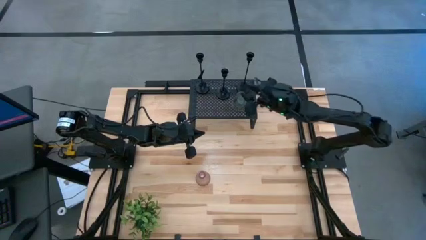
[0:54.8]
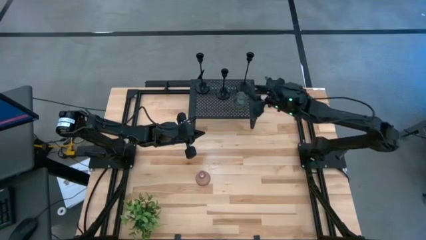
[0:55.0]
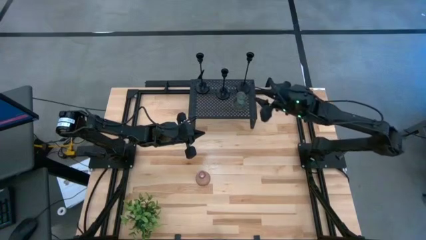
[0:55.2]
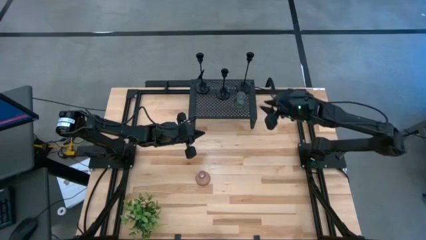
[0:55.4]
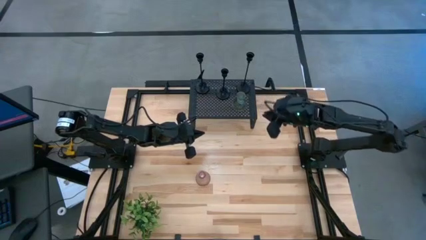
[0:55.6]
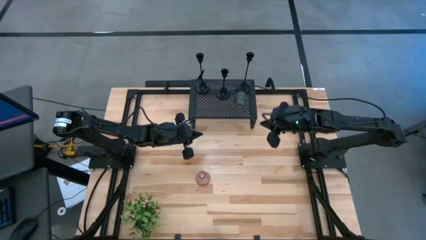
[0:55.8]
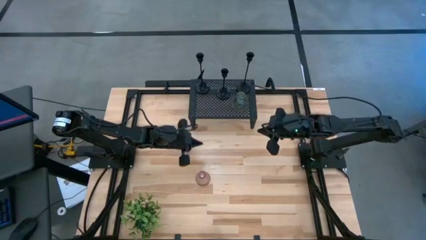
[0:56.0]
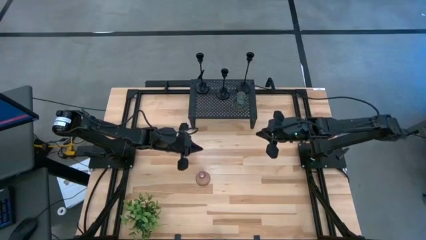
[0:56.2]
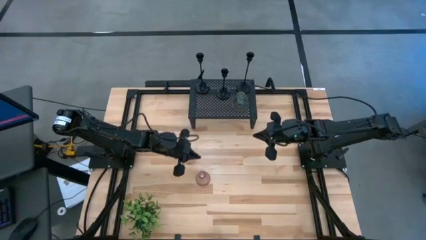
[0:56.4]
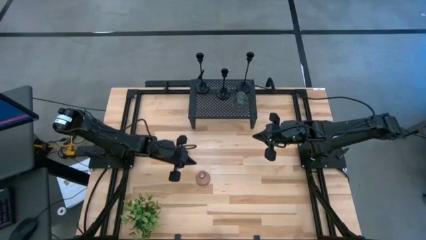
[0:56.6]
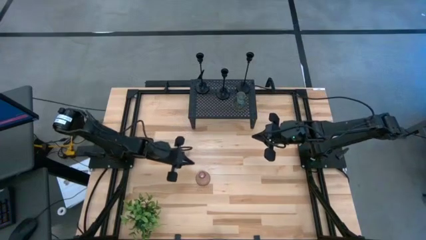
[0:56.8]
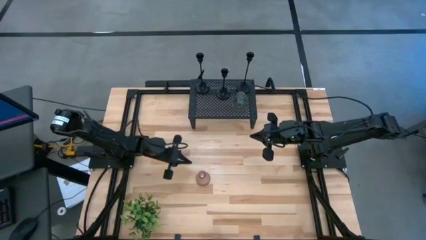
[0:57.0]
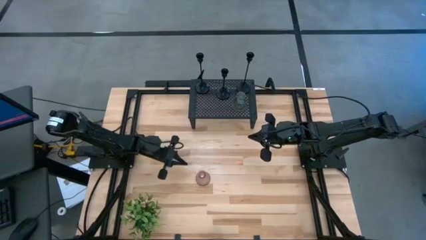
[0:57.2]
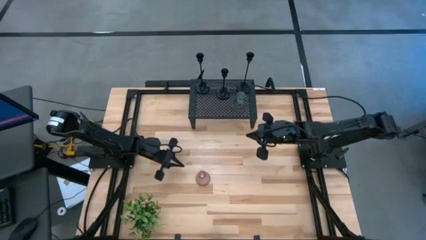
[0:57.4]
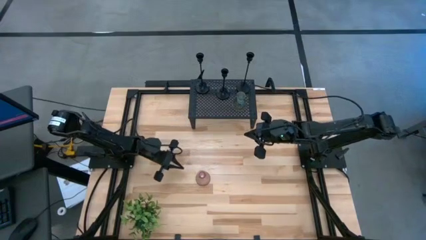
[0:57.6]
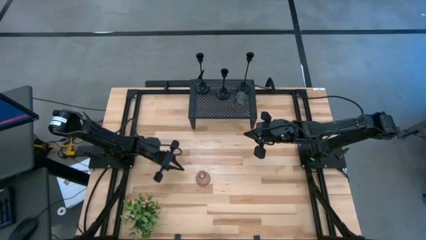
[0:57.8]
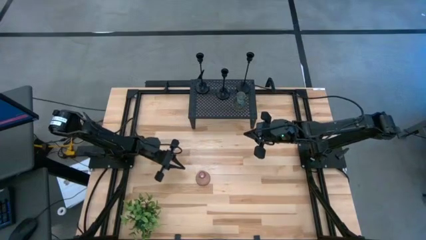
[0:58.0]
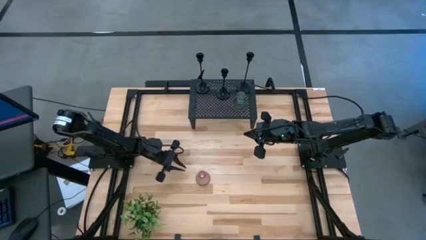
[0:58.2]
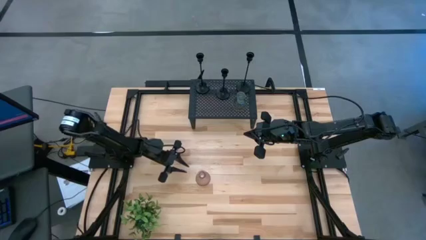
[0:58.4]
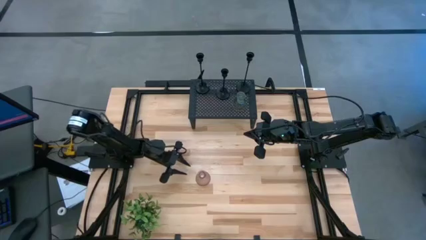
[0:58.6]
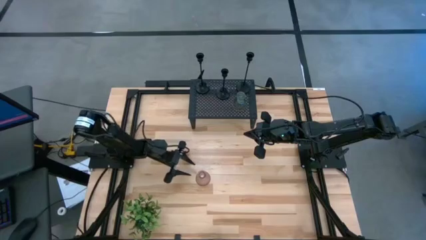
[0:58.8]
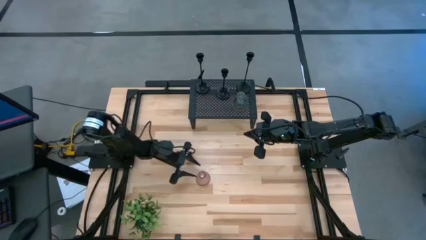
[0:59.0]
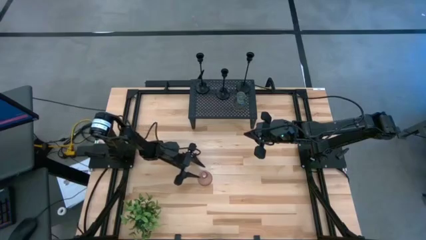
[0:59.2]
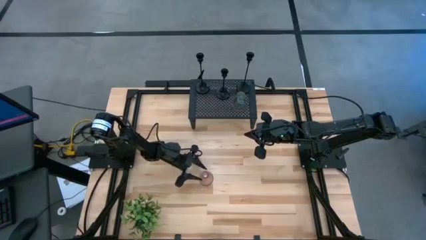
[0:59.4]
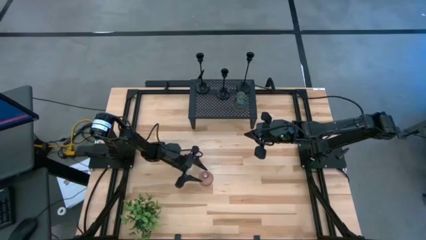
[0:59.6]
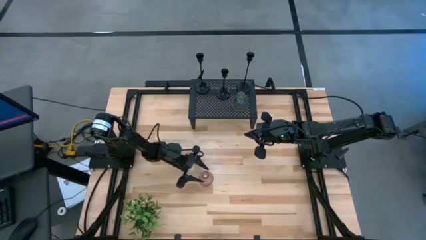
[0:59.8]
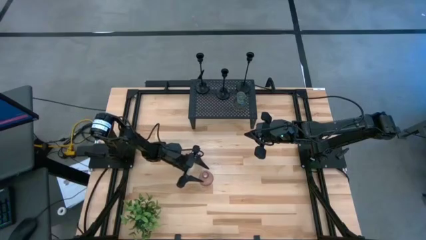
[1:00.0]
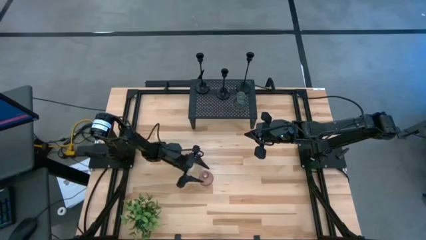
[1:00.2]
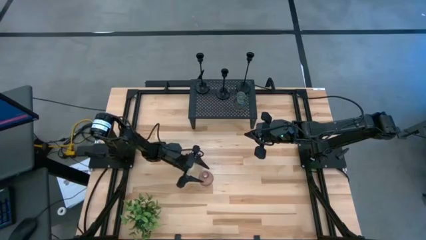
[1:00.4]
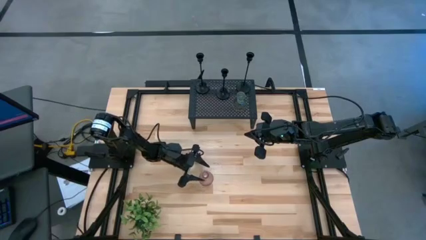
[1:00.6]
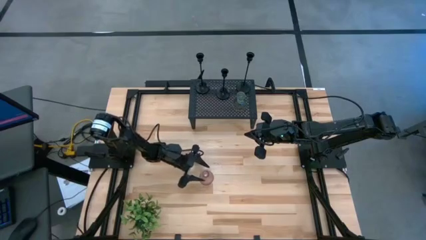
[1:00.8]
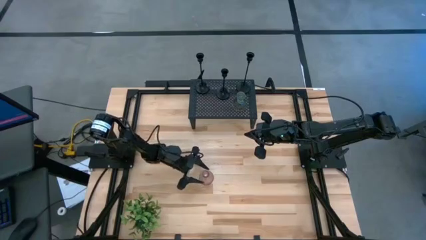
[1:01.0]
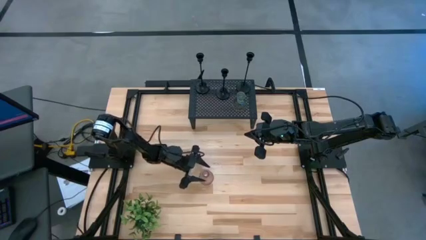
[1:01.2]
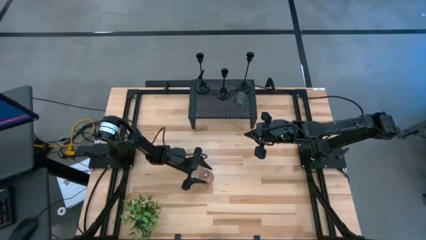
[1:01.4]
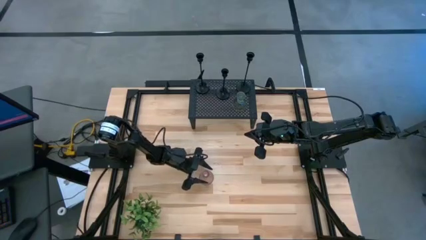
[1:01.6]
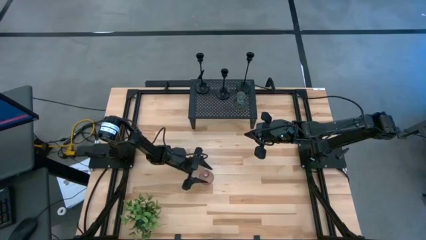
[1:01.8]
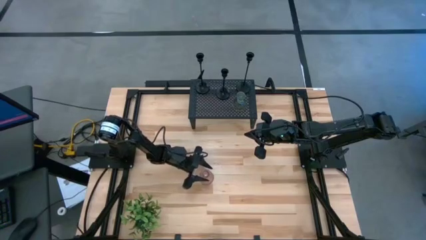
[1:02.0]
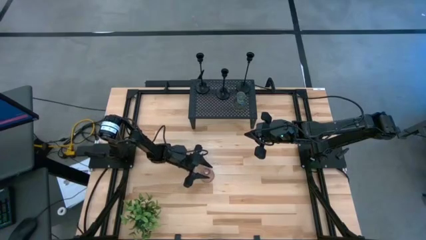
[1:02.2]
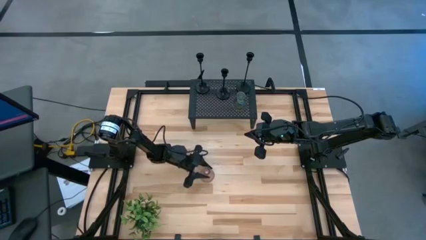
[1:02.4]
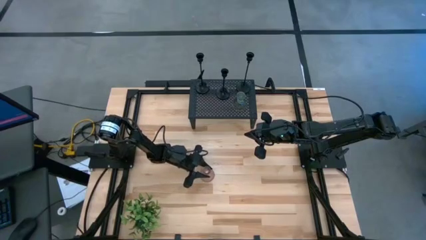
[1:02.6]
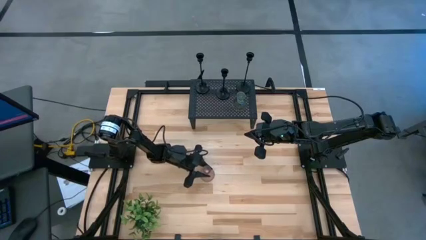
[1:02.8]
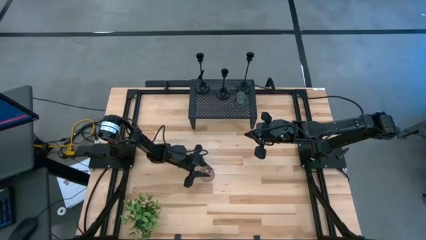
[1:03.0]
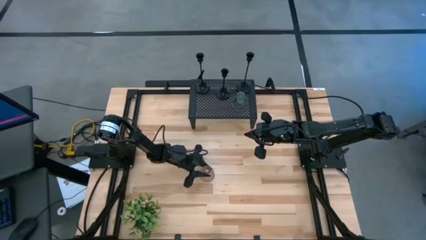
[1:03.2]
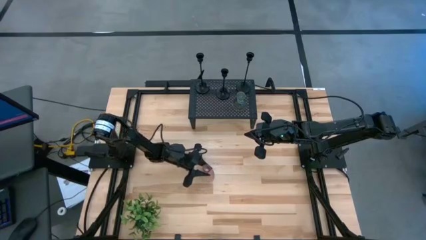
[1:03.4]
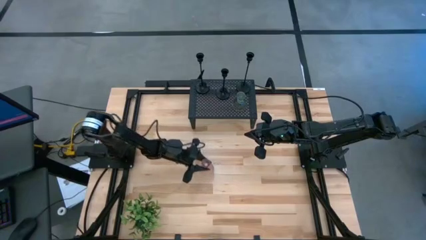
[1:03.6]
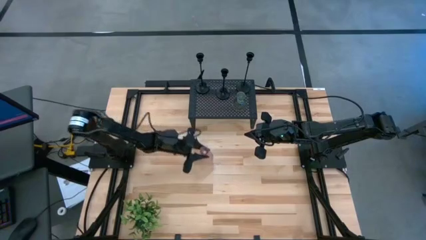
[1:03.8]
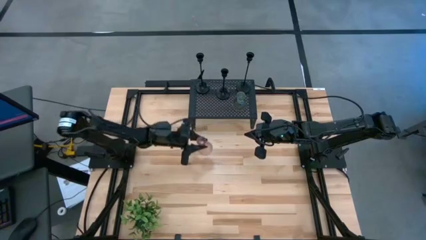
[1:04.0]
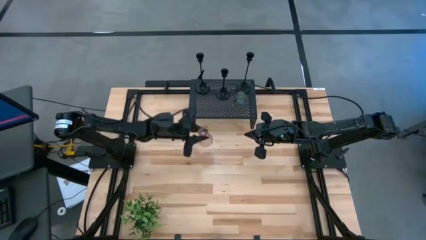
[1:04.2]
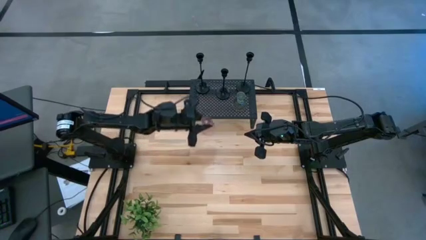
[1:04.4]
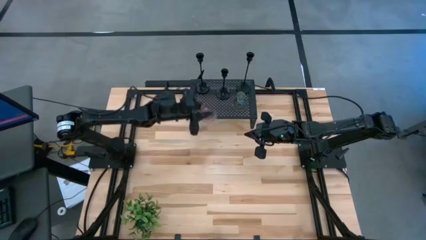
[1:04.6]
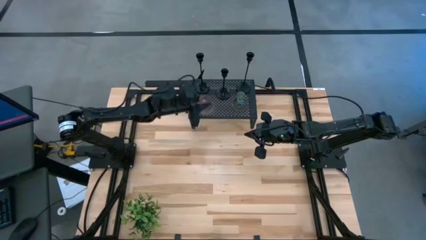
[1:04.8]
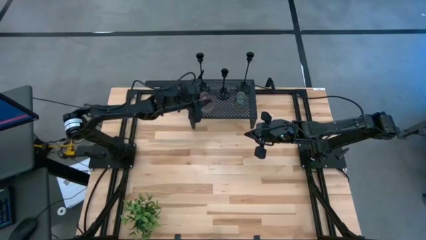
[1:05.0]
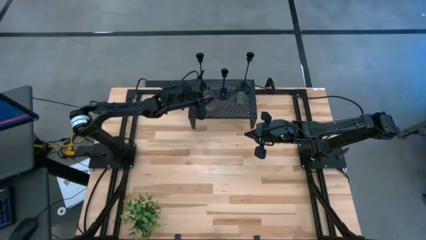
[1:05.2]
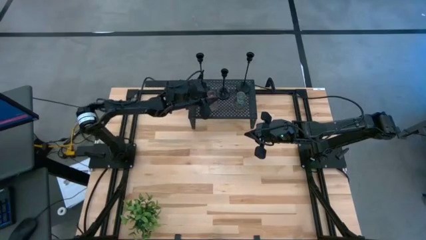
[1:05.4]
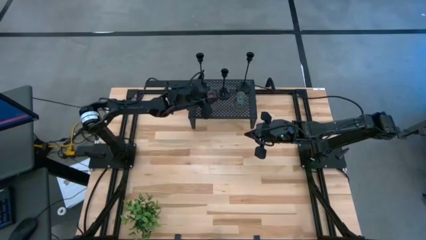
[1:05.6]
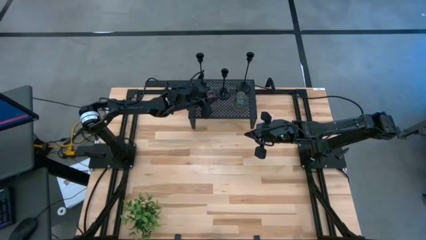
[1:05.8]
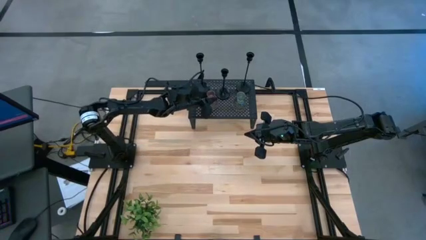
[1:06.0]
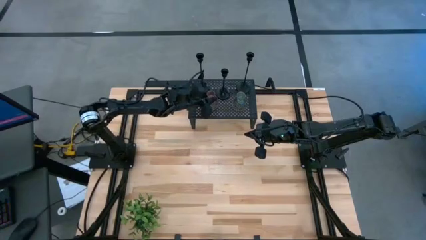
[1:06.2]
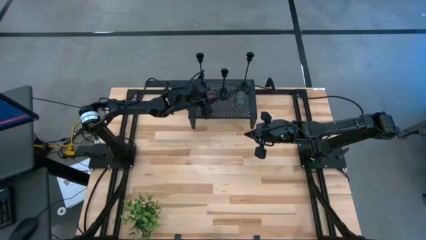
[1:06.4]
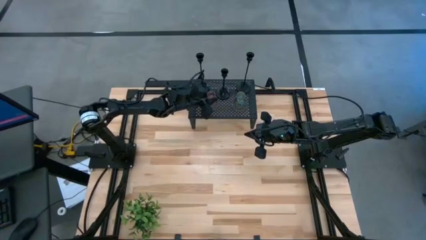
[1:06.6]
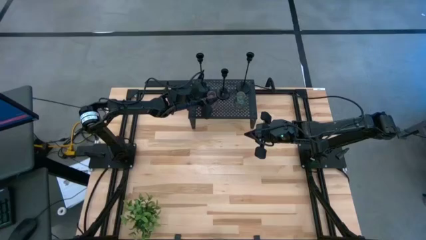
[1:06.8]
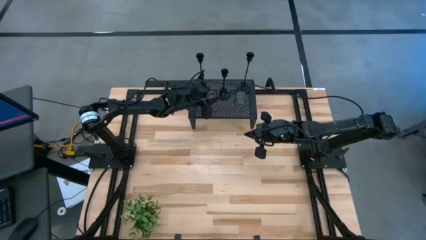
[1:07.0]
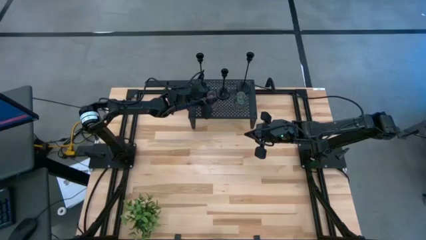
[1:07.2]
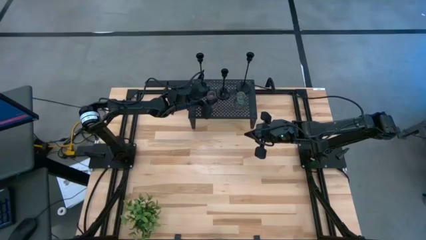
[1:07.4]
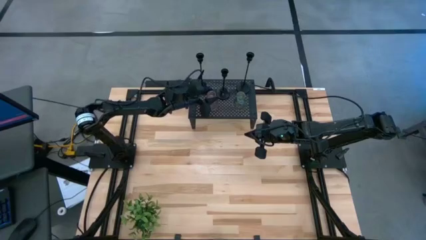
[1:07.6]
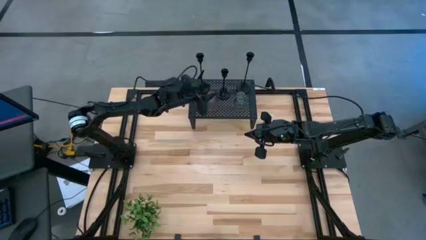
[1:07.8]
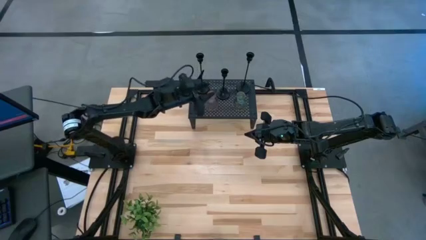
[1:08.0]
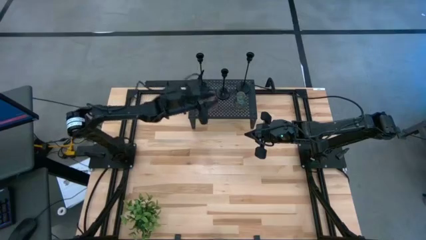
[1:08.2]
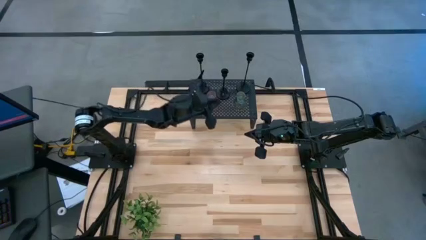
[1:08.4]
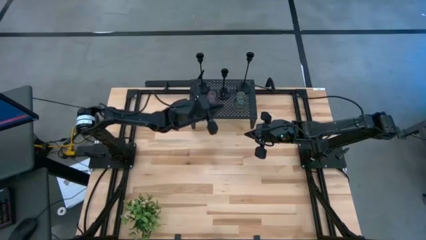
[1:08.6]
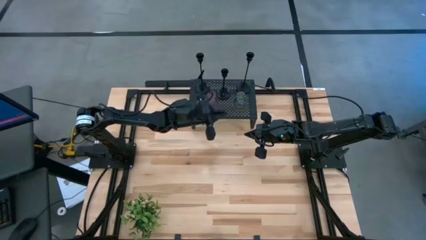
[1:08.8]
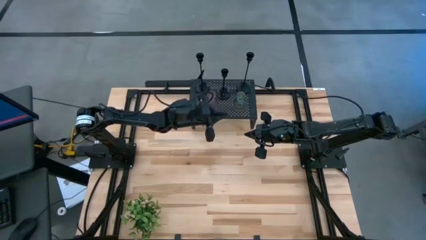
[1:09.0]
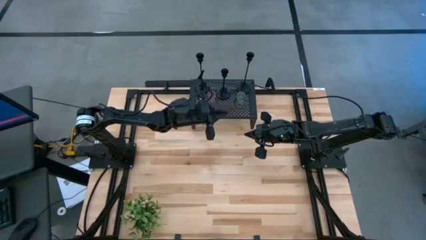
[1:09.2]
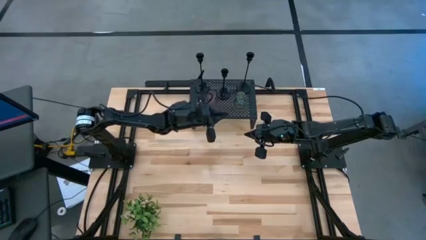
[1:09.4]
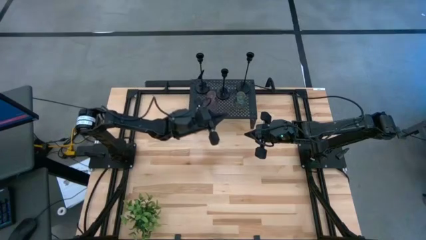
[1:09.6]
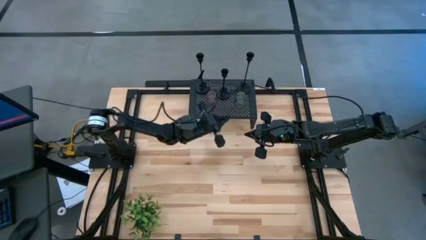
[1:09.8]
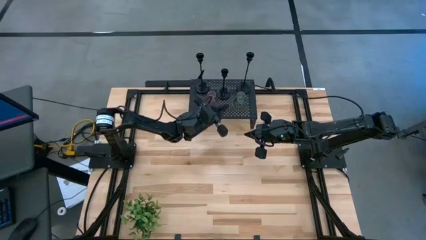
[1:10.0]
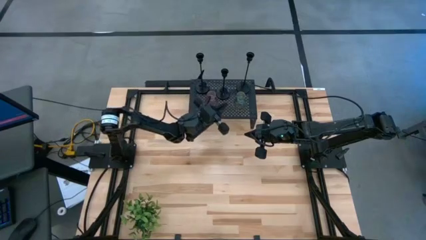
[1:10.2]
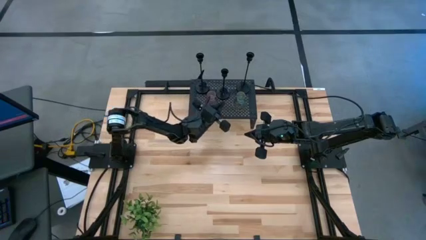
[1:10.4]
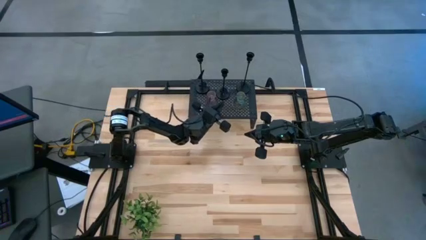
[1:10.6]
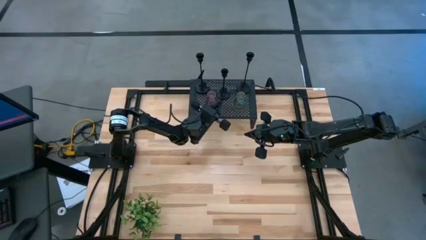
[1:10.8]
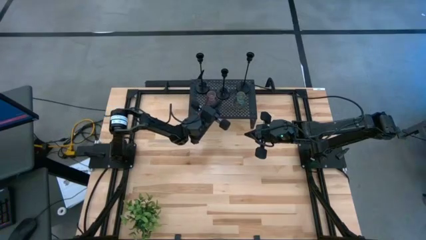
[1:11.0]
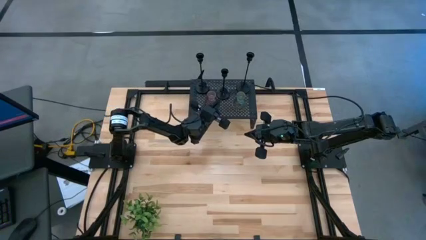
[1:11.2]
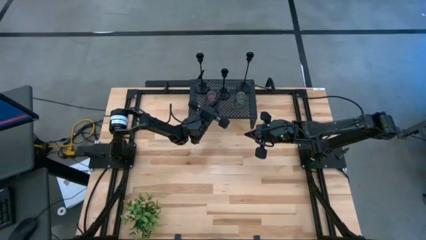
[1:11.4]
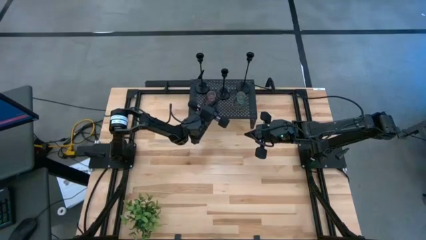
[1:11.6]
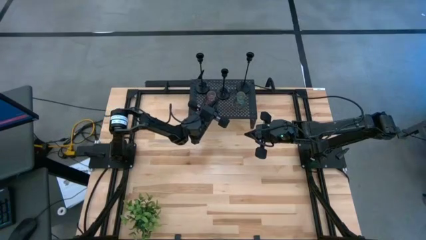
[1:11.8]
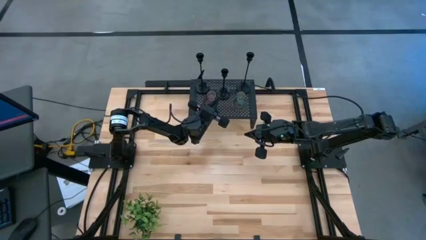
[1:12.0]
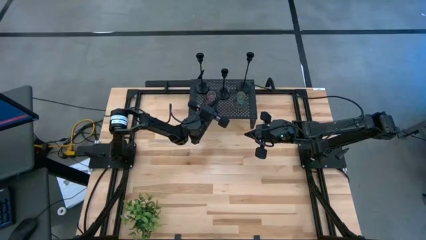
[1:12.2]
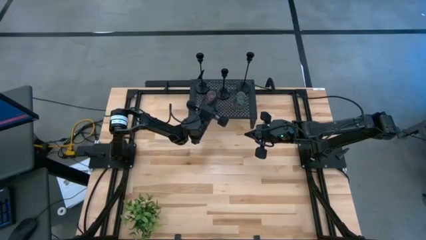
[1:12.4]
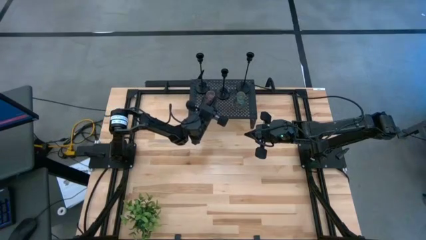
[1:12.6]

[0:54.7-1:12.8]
Task: Pick & Place candle stick holders
Put the purple candle holder on the shelf
